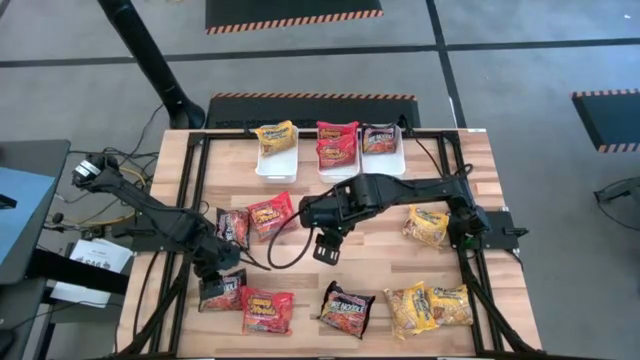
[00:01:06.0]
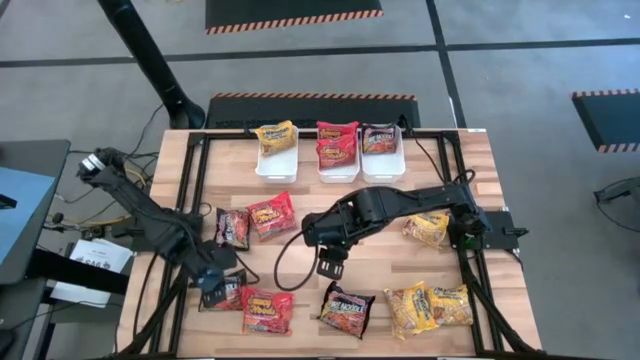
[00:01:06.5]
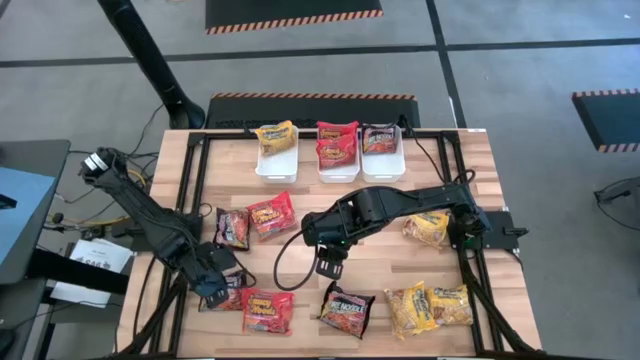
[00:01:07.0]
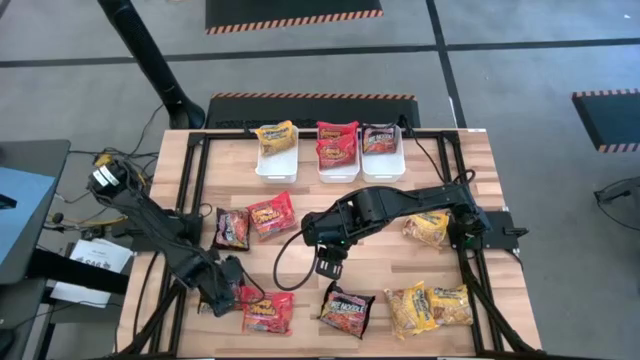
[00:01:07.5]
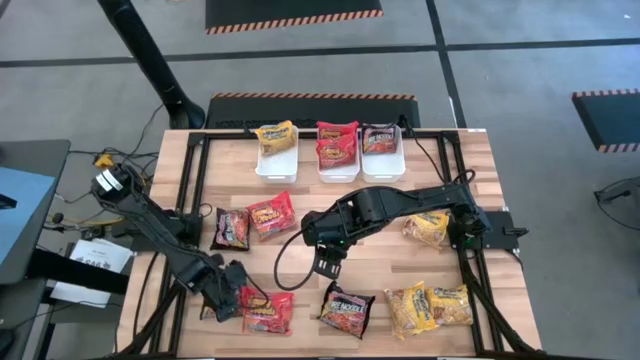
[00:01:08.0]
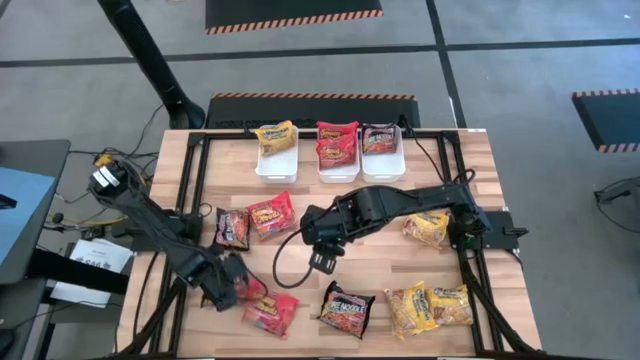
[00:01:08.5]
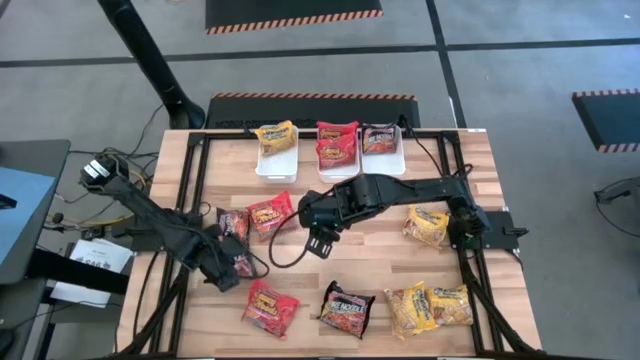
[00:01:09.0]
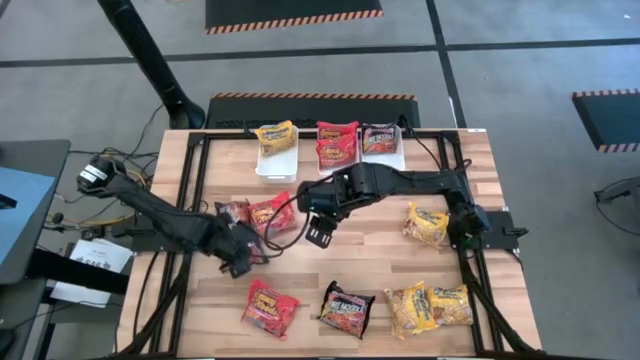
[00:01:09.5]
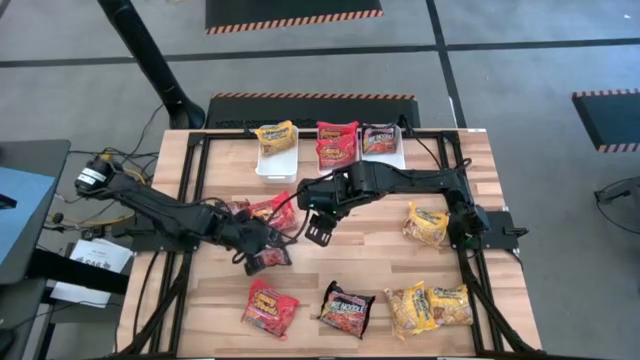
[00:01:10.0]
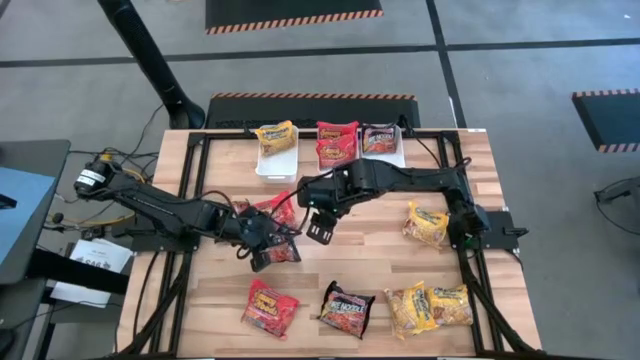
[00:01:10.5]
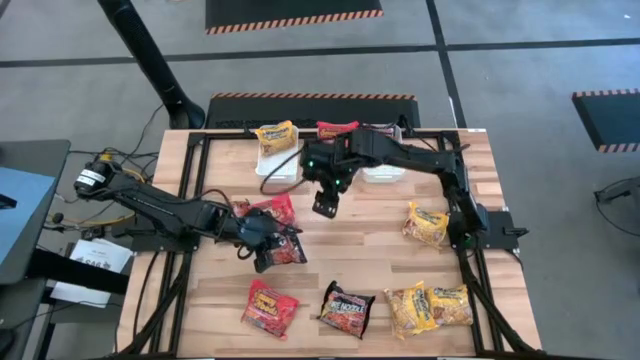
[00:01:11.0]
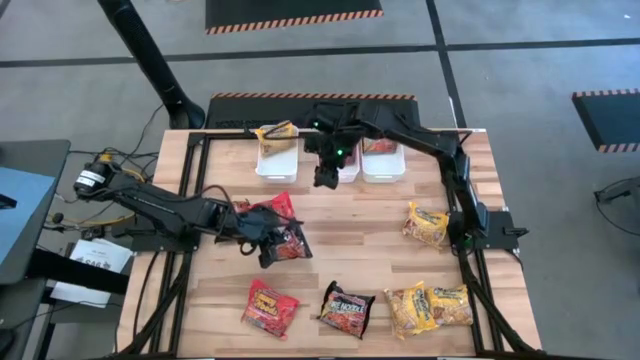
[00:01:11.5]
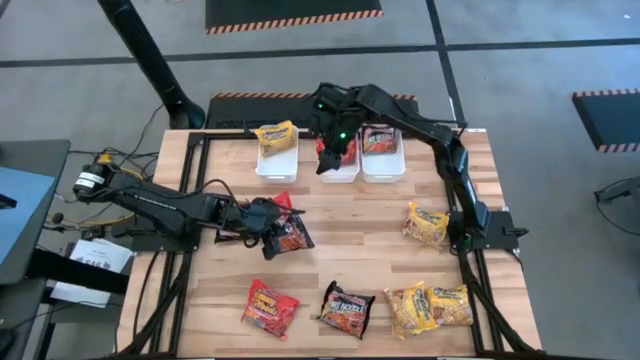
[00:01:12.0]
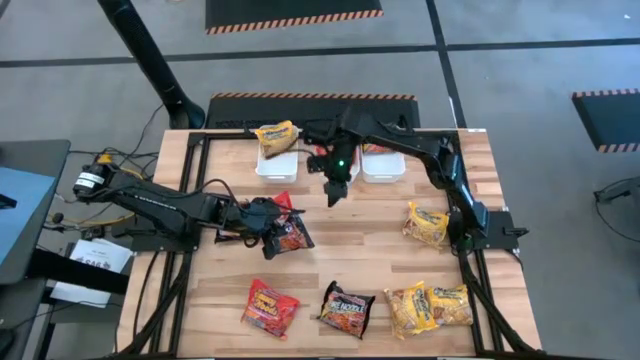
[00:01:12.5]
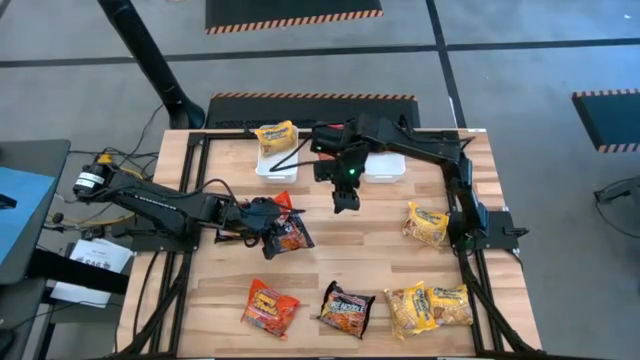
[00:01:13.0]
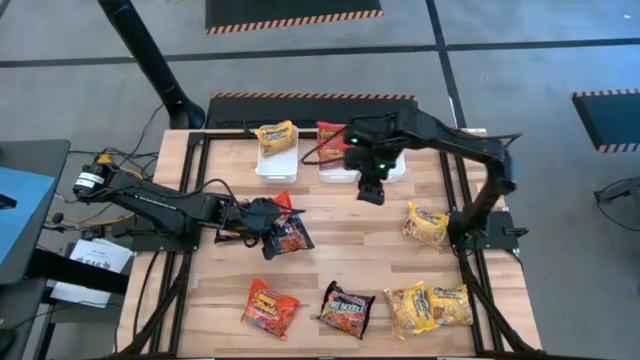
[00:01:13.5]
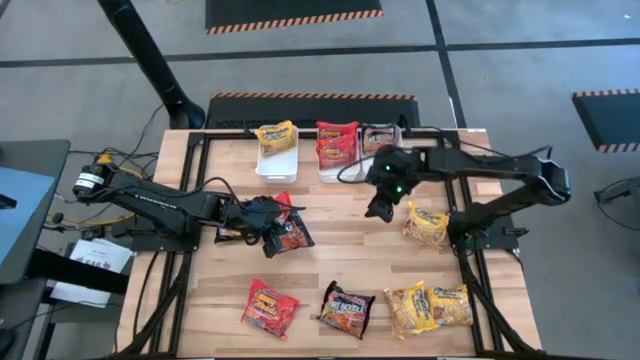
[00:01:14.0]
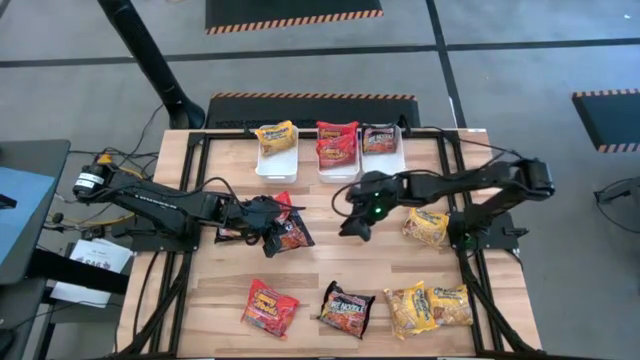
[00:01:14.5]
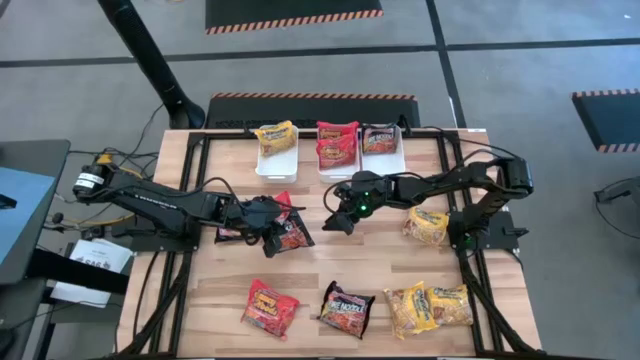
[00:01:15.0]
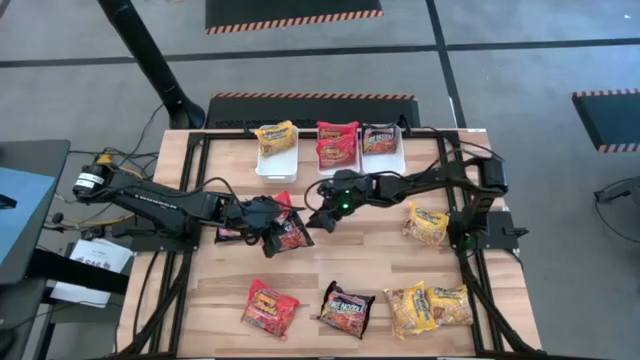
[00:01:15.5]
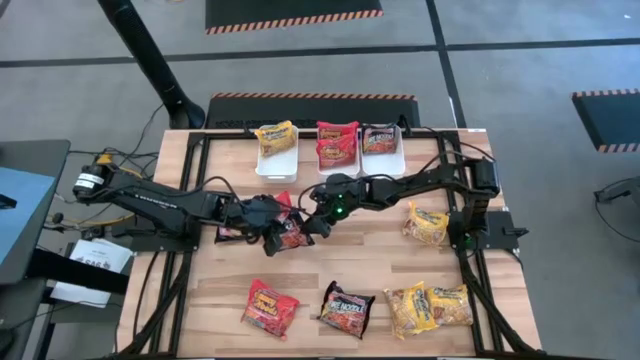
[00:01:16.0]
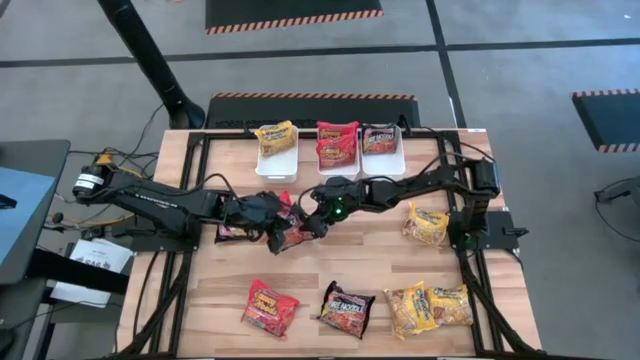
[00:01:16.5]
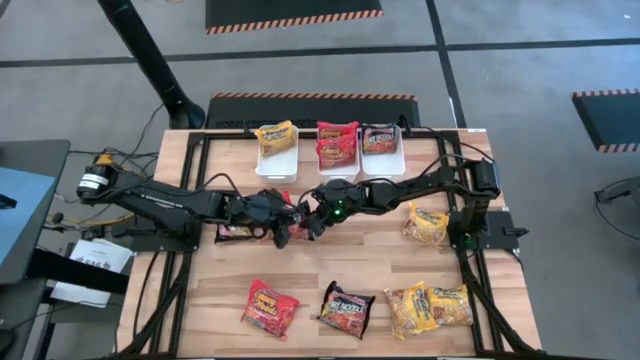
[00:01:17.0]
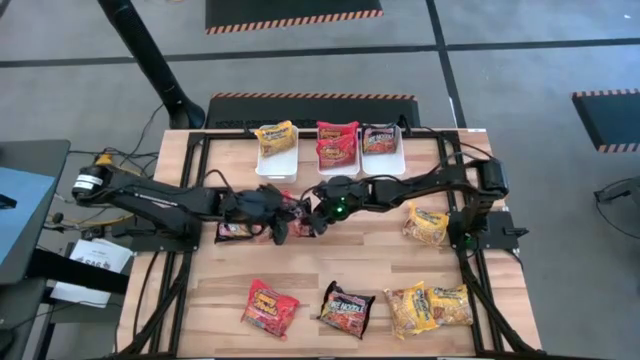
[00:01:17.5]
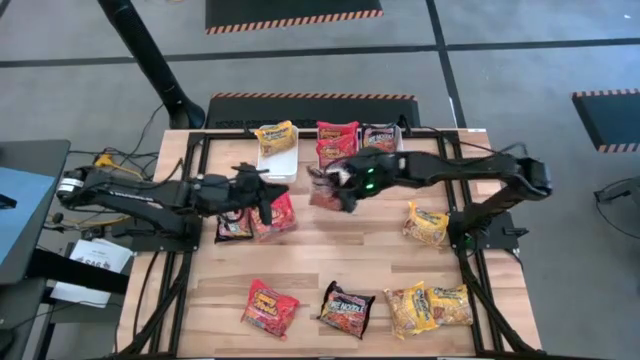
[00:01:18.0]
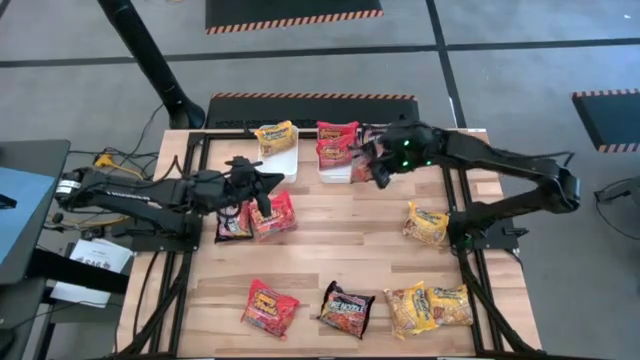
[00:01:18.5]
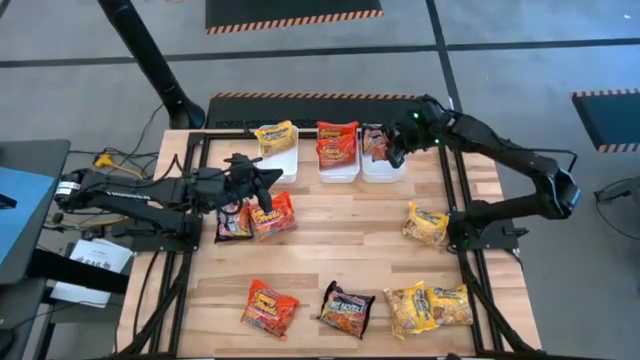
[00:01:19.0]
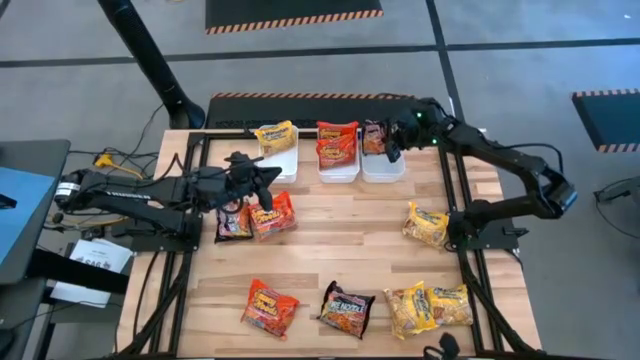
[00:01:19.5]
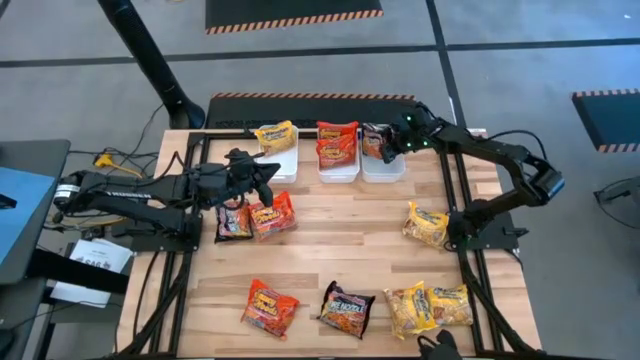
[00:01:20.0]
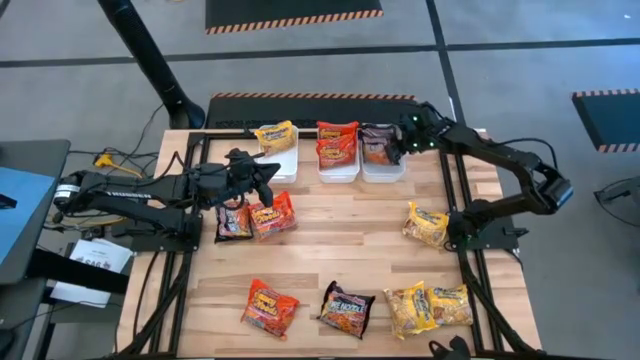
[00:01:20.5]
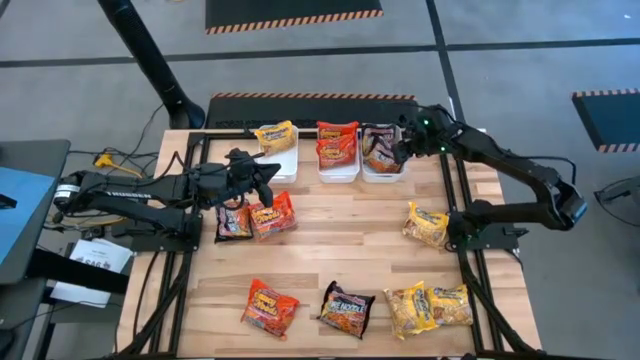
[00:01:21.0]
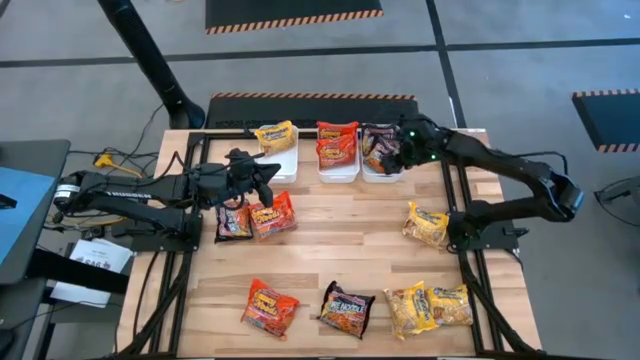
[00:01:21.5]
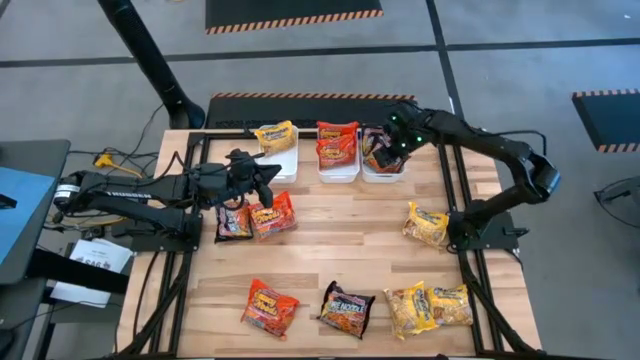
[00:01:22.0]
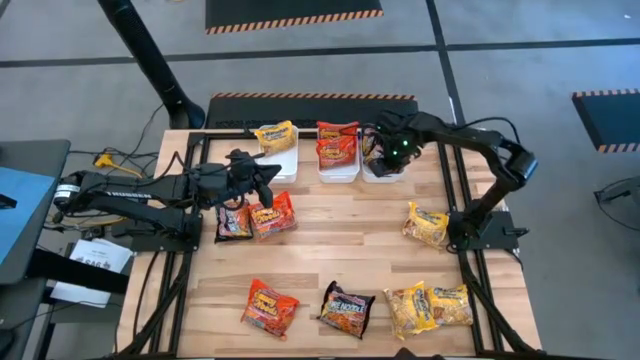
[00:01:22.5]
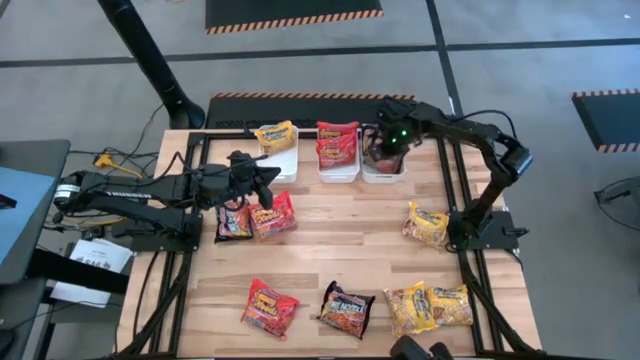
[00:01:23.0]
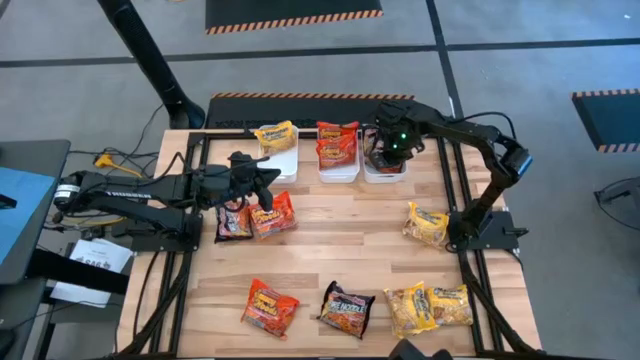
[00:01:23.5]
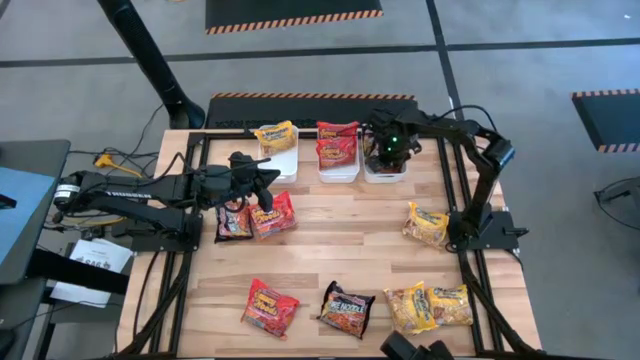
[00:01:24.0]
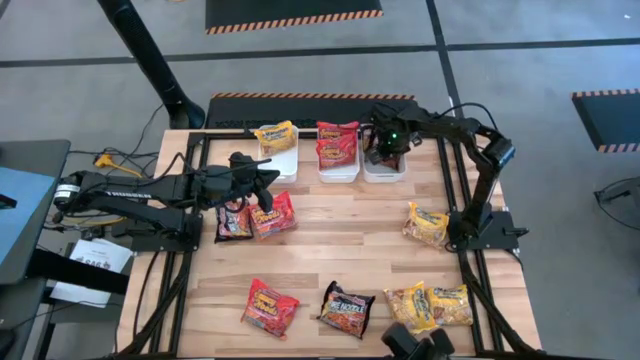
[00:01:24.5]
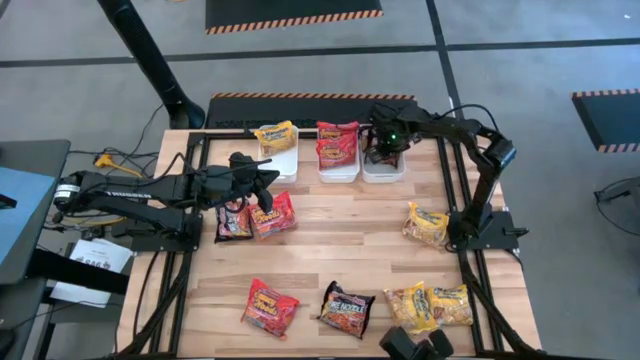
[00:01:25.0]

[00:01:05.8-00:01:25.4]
Task: Sort Maruchan noodles
Put the black noodle pack into the right white bin
